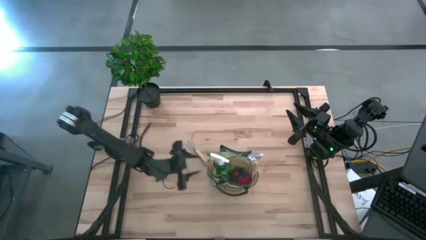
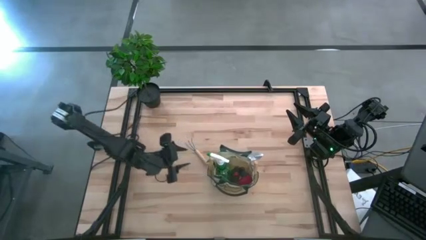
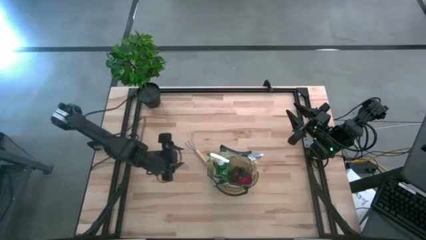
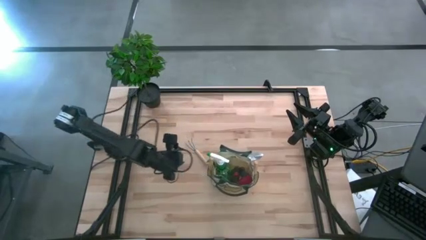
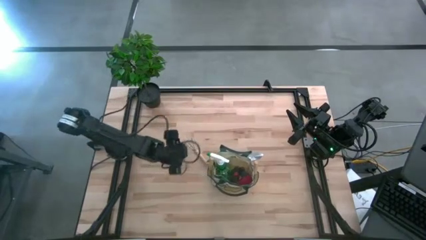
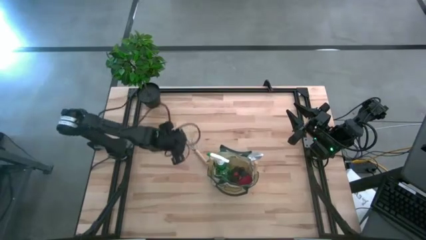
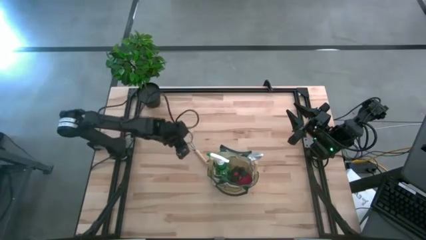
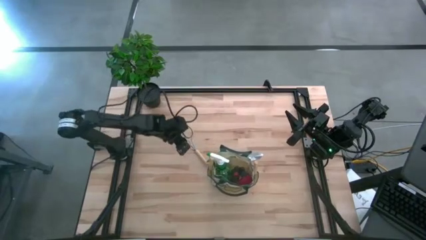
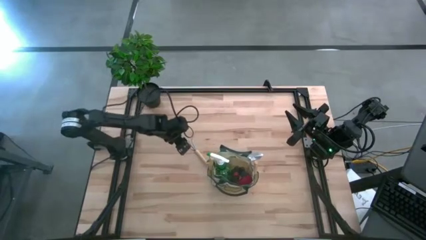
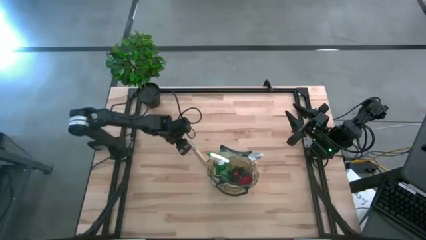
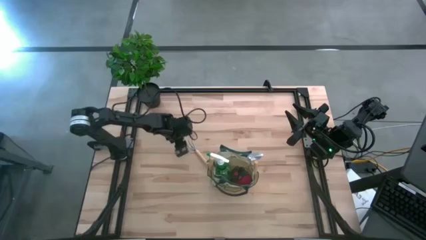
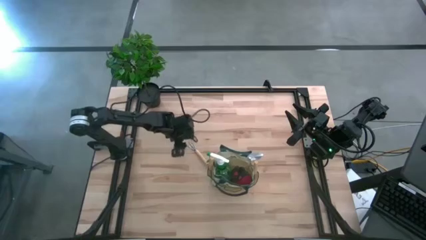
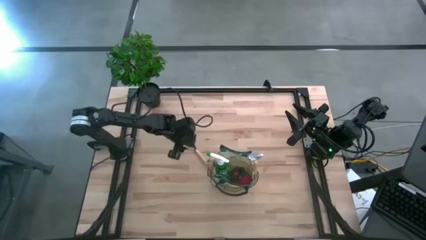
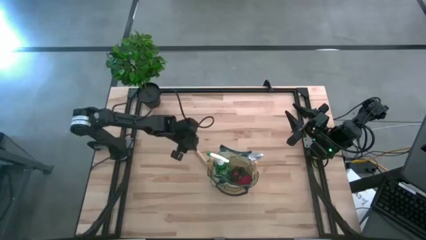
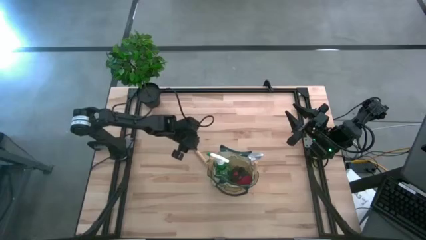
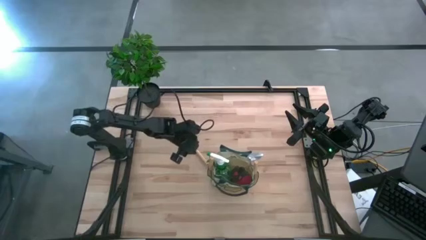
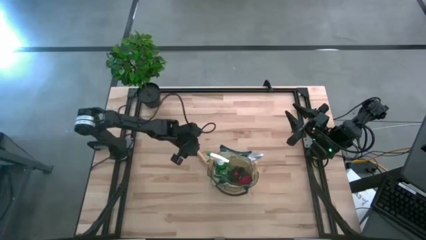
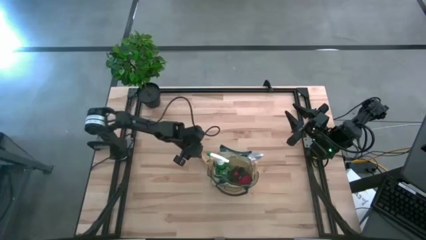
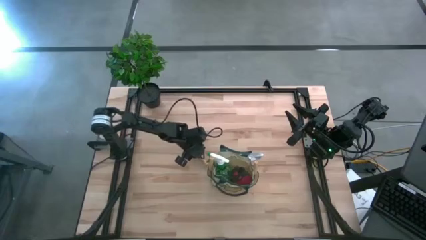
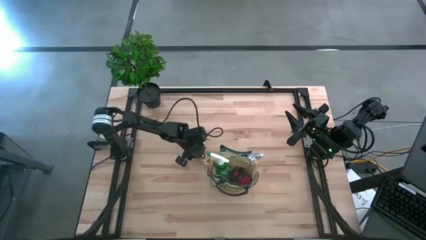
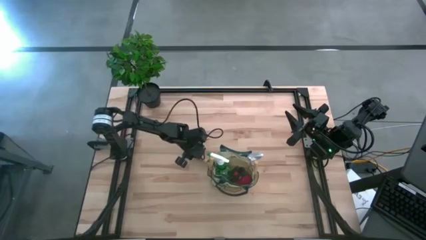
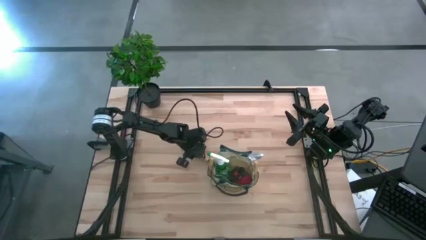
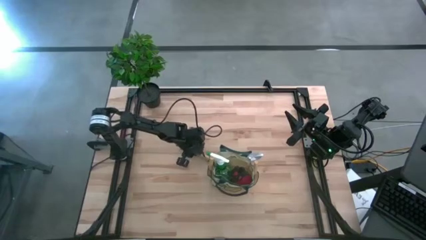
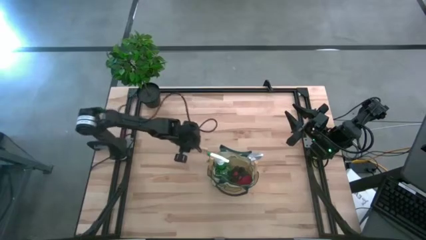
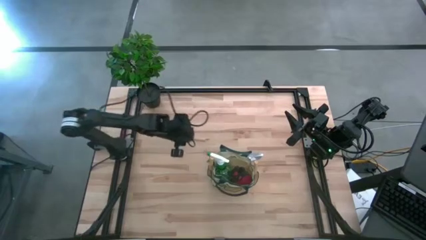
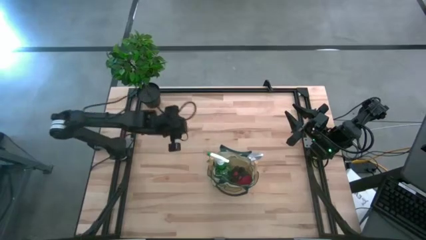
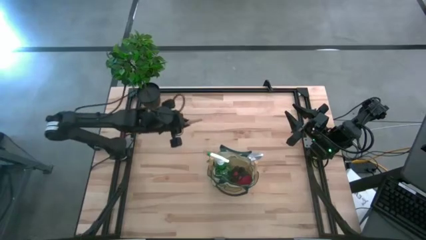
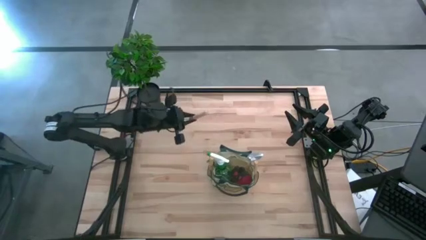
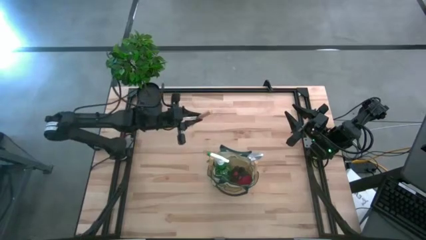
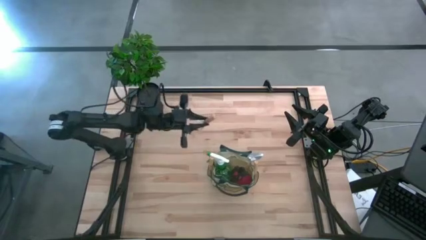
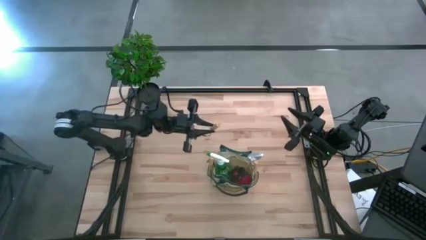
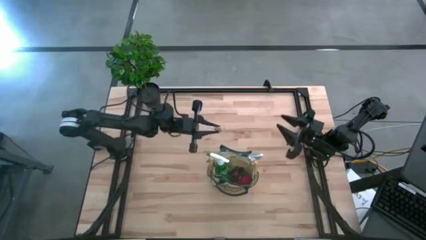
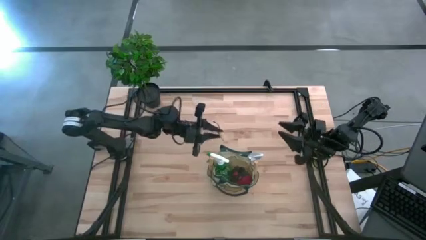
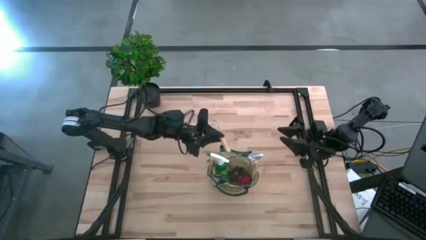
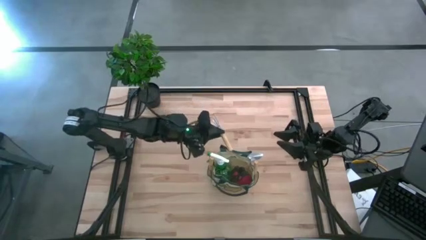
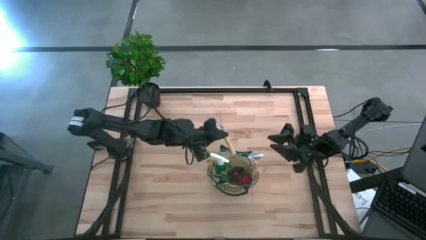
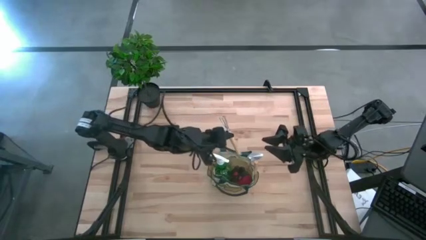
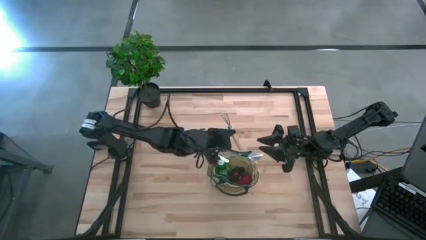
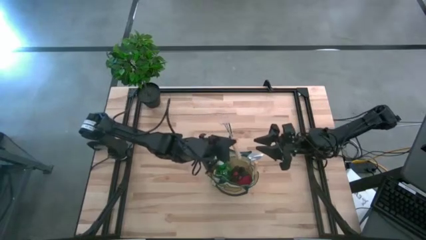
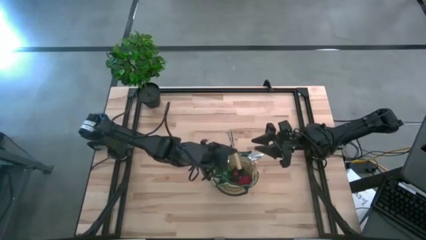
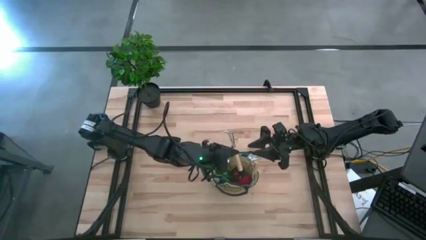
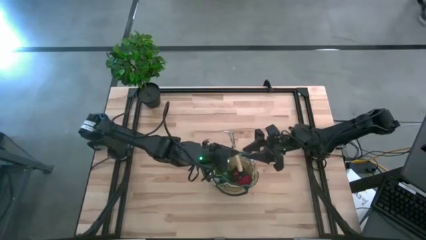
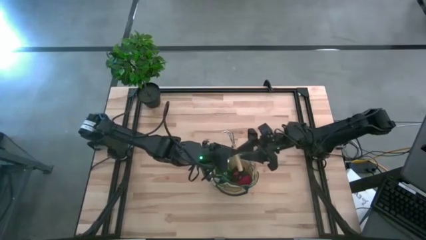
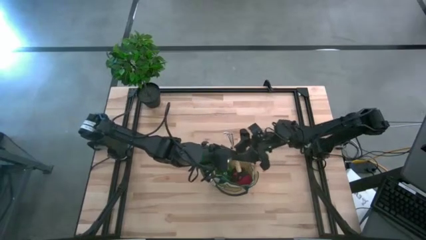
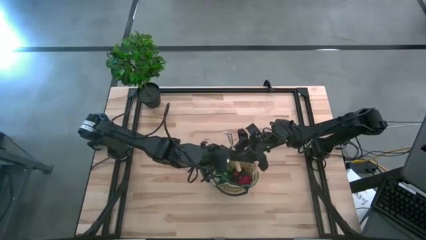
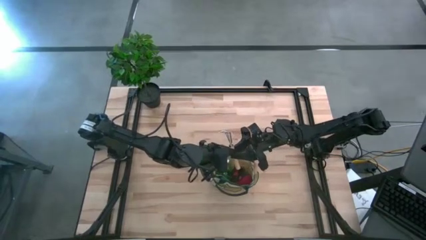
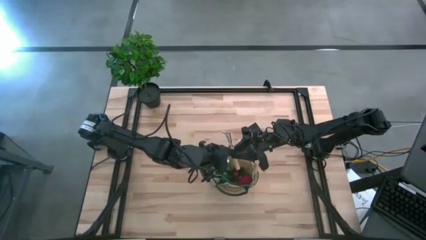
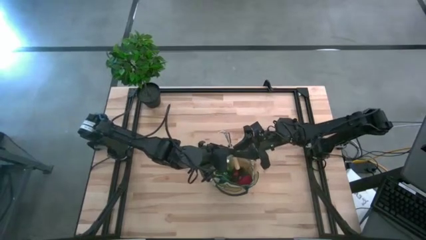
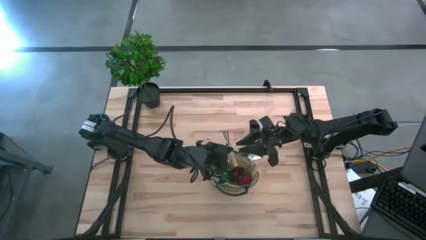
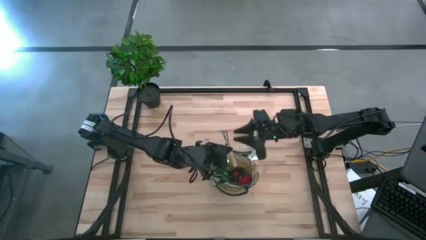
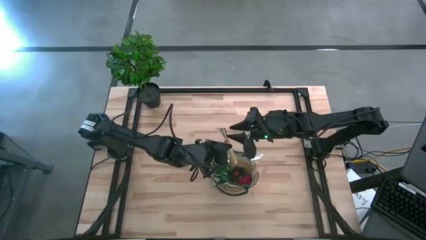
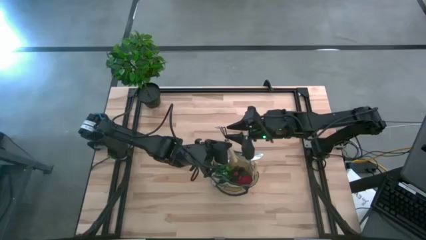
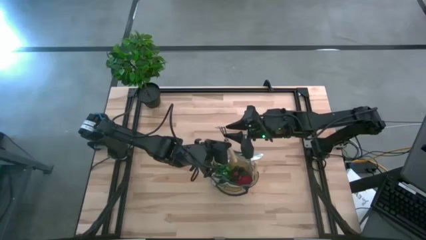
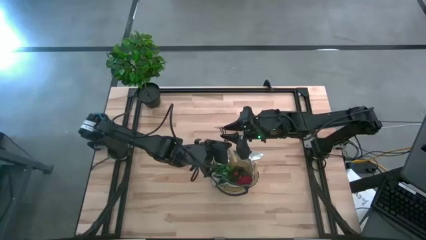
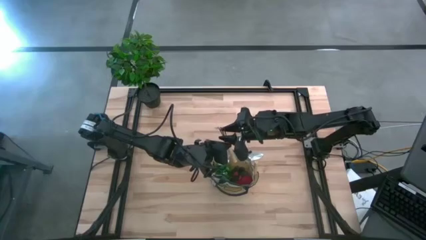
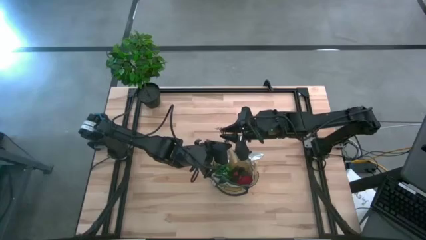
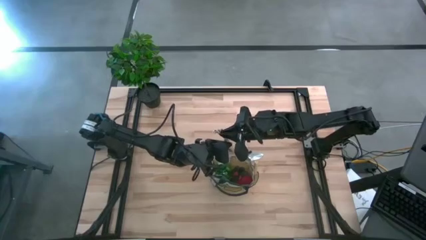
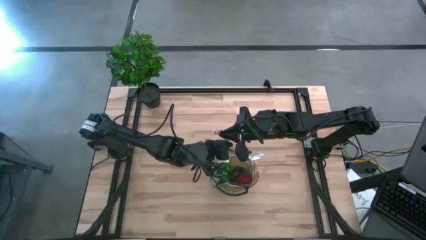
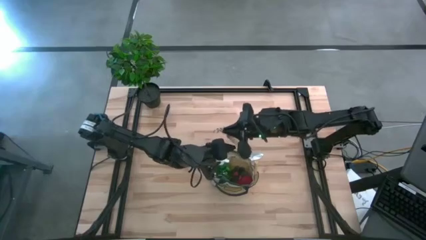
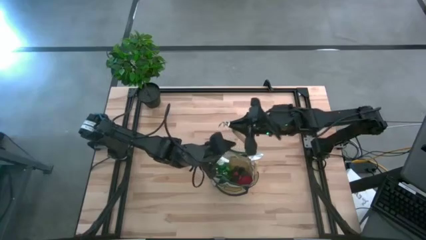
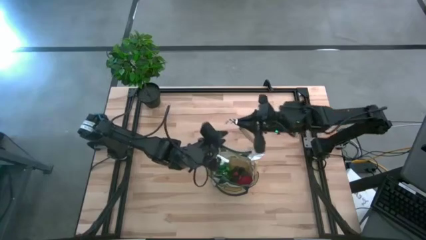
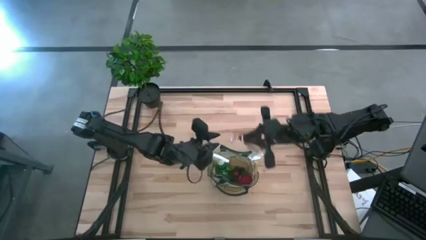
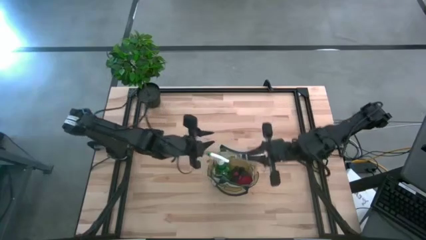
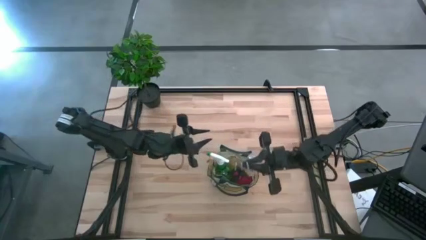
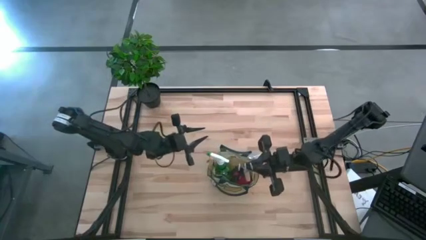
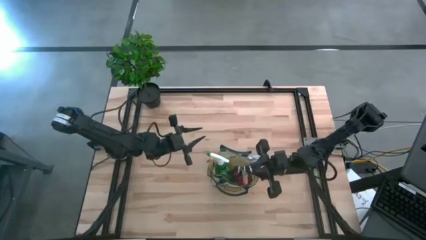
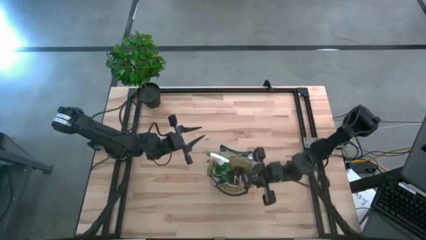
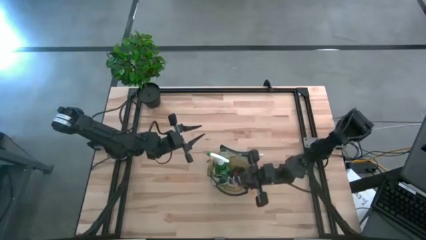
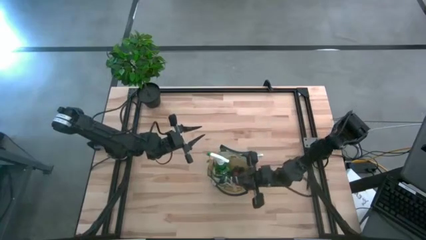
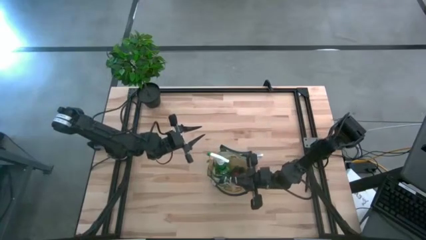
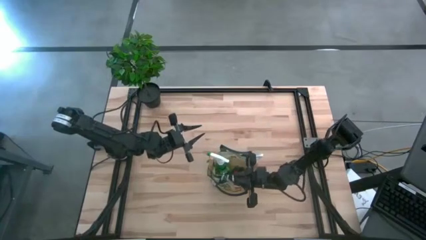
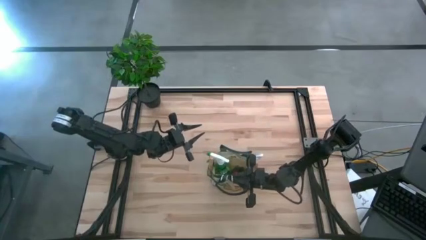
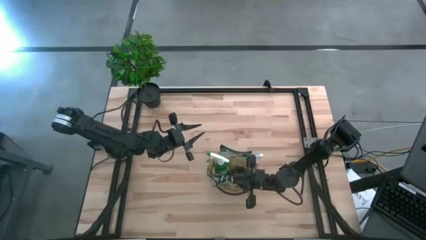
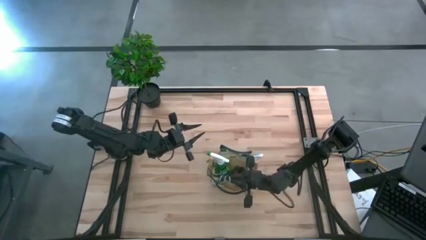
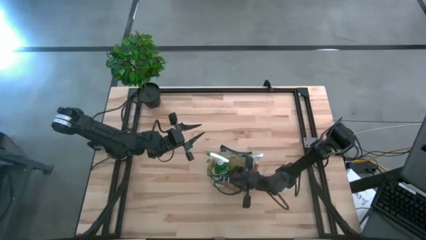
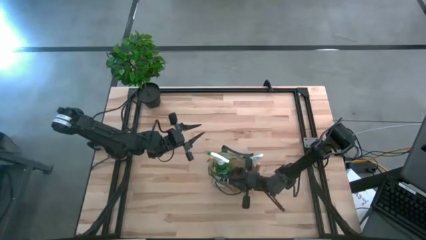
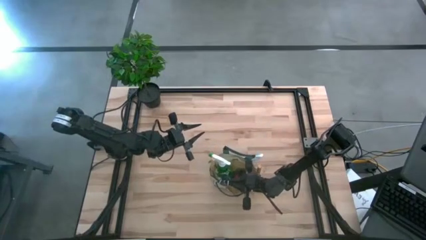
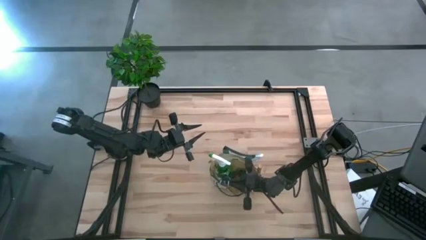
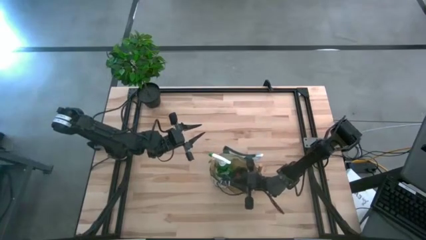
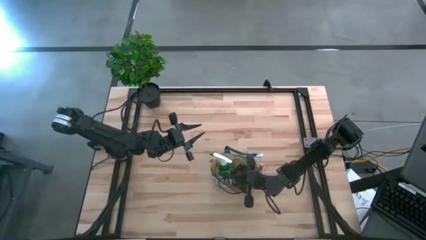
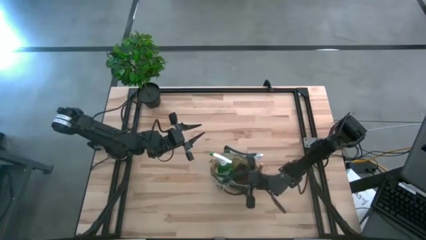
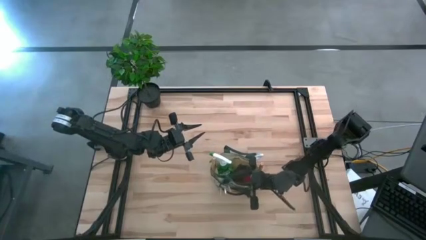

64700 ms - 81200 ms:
Task: Pick & Place Garden tools in Gardening bag
Put the gardening hand rake into the gardening bag
